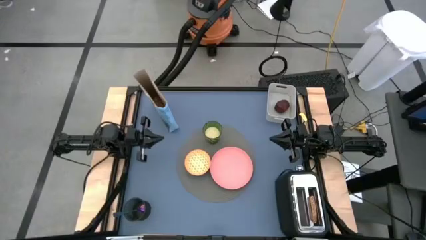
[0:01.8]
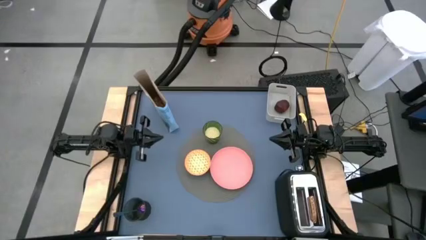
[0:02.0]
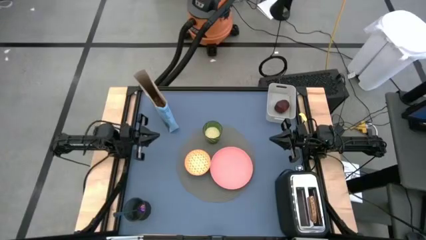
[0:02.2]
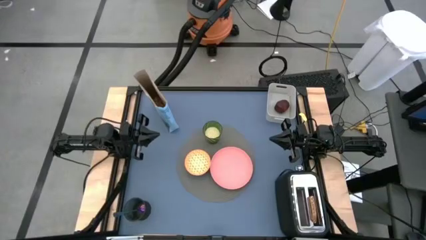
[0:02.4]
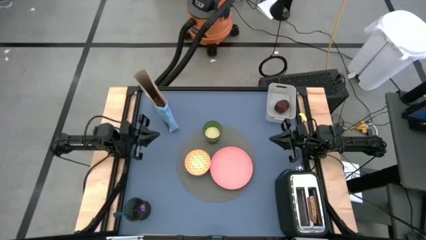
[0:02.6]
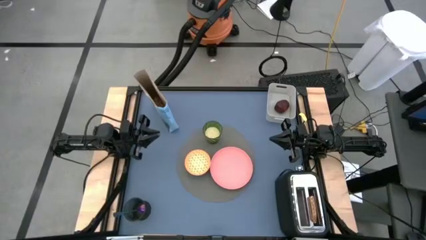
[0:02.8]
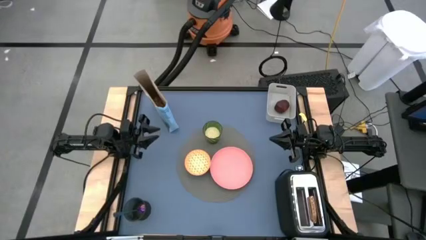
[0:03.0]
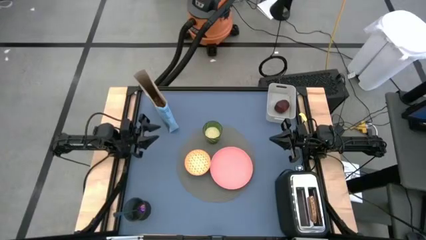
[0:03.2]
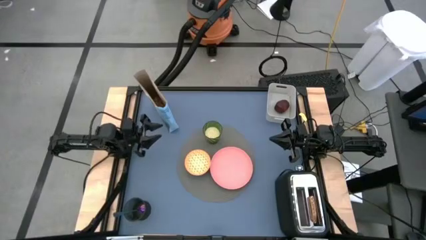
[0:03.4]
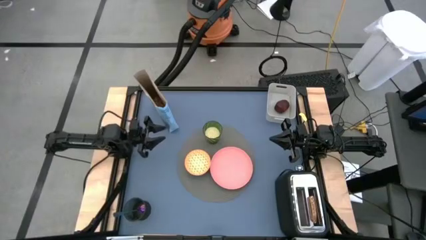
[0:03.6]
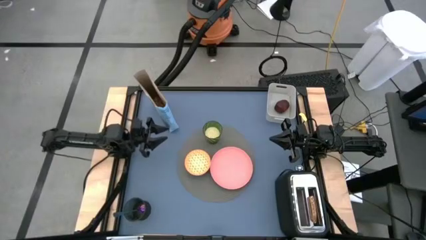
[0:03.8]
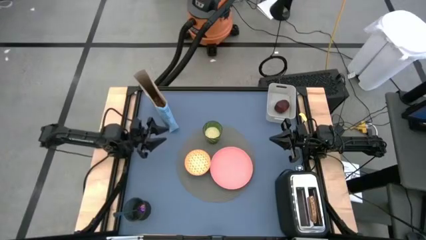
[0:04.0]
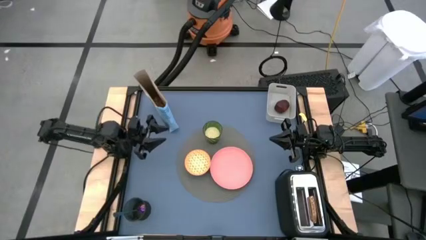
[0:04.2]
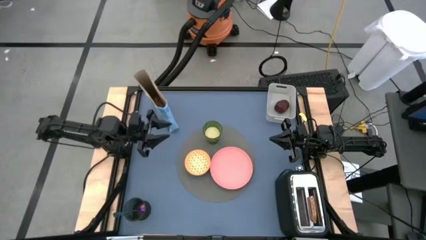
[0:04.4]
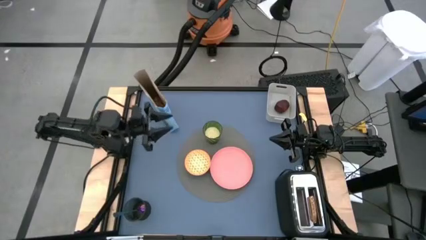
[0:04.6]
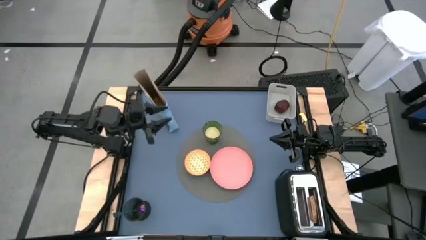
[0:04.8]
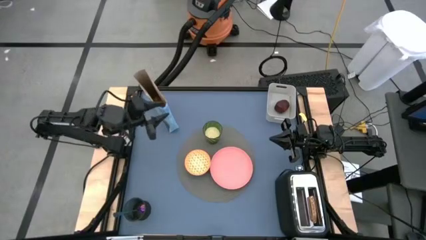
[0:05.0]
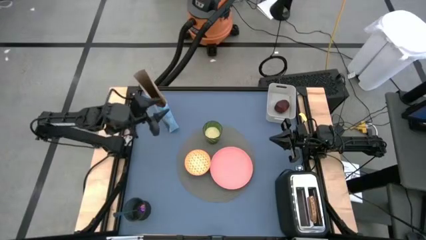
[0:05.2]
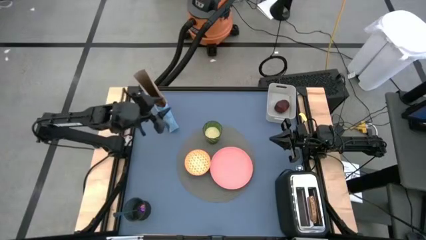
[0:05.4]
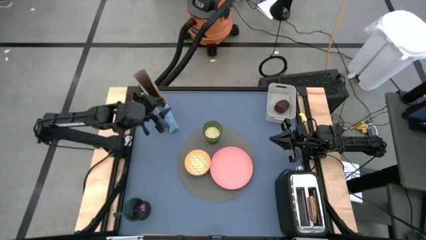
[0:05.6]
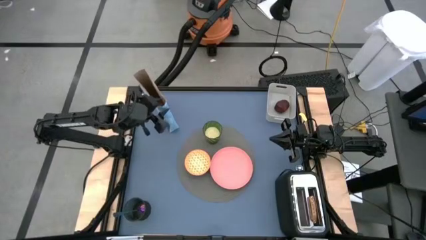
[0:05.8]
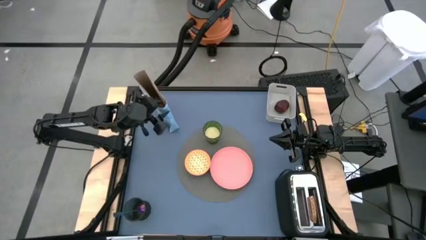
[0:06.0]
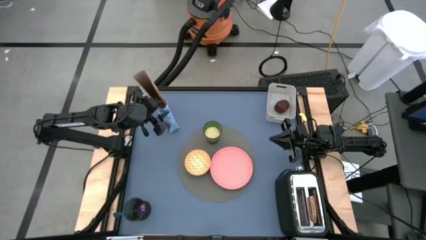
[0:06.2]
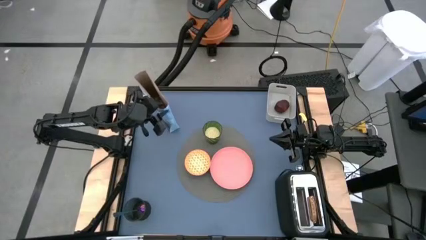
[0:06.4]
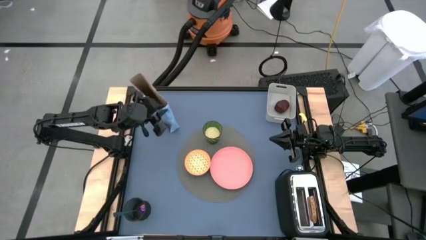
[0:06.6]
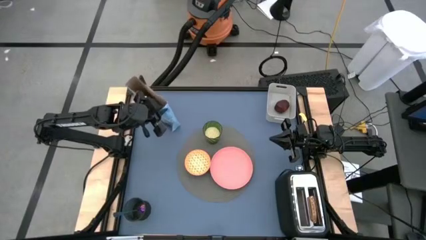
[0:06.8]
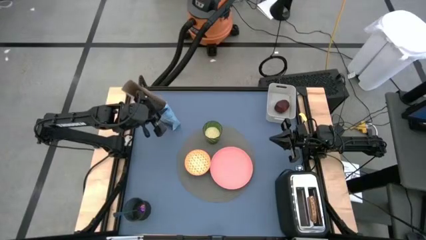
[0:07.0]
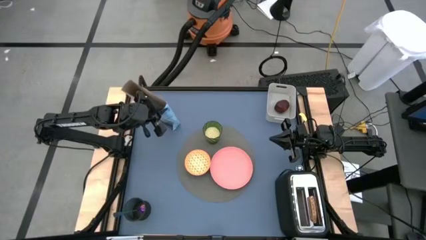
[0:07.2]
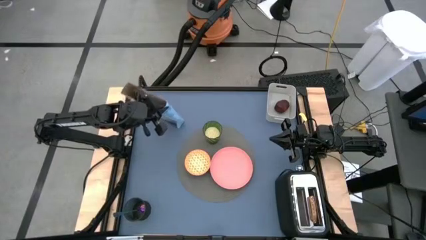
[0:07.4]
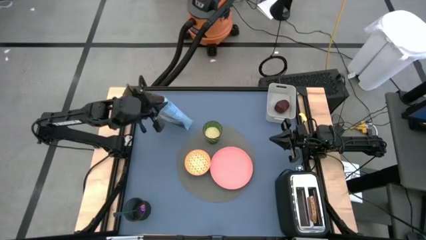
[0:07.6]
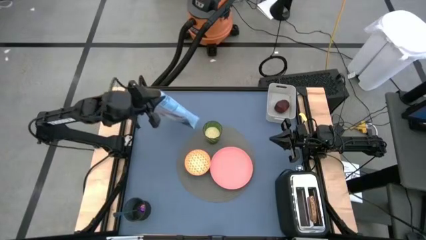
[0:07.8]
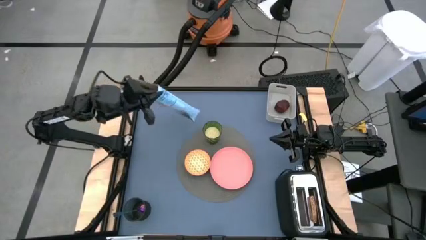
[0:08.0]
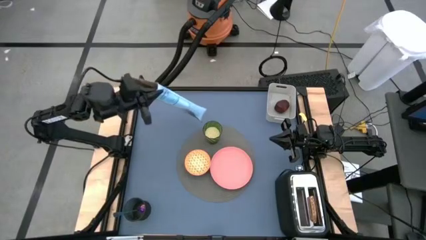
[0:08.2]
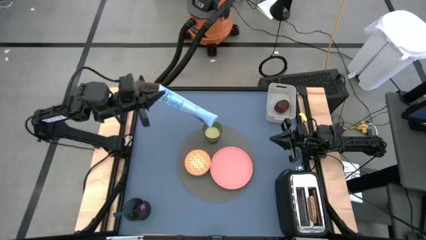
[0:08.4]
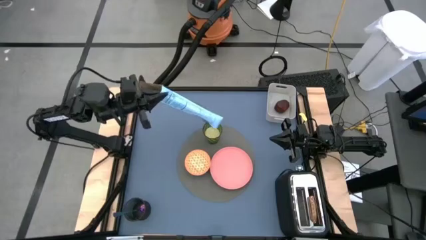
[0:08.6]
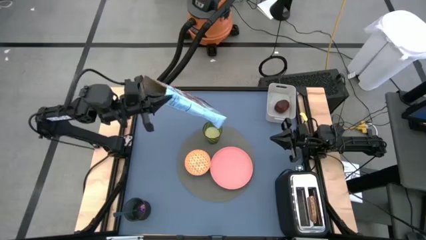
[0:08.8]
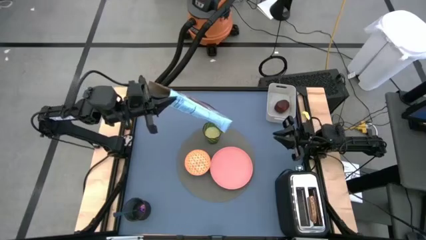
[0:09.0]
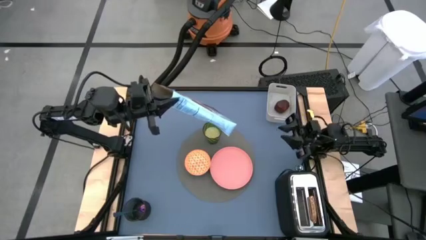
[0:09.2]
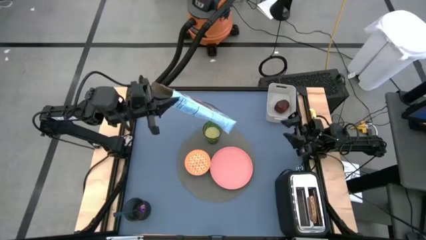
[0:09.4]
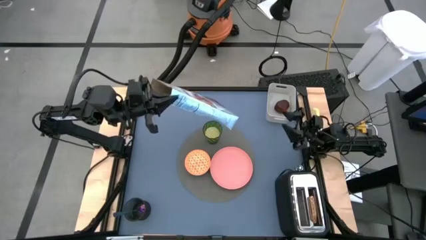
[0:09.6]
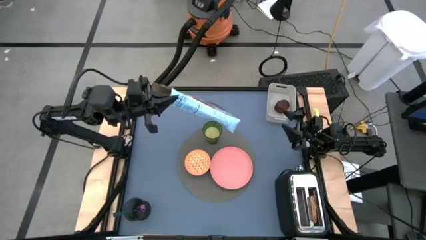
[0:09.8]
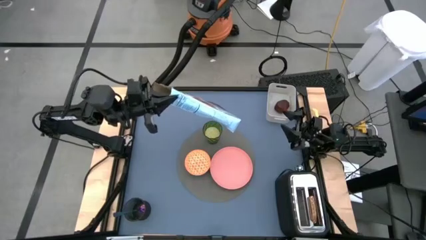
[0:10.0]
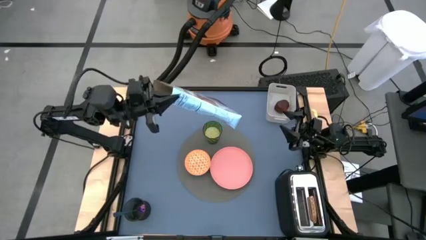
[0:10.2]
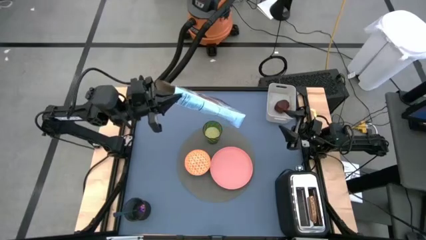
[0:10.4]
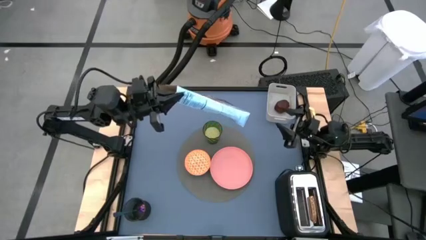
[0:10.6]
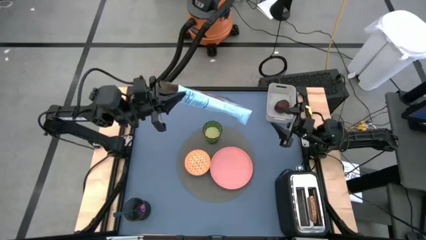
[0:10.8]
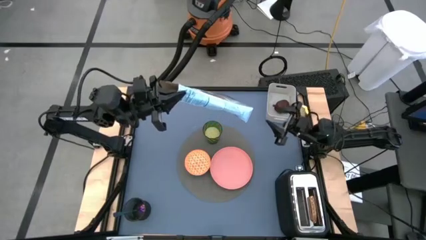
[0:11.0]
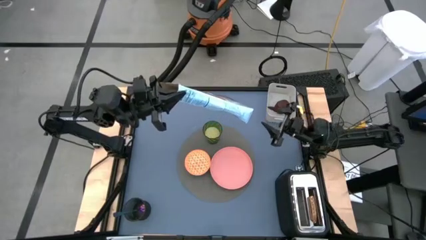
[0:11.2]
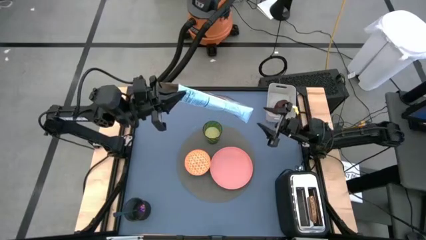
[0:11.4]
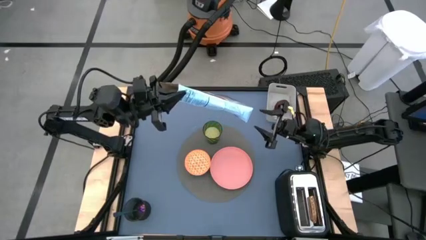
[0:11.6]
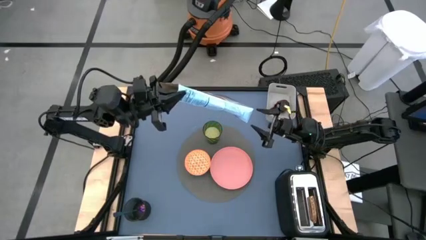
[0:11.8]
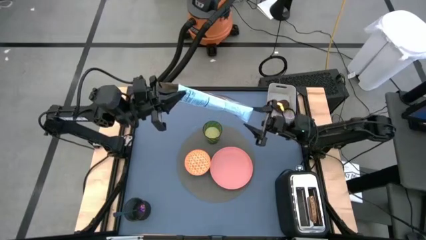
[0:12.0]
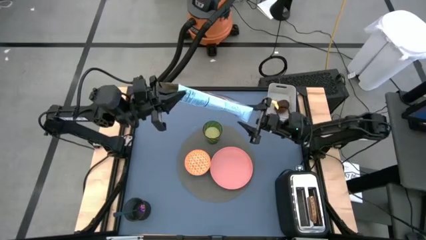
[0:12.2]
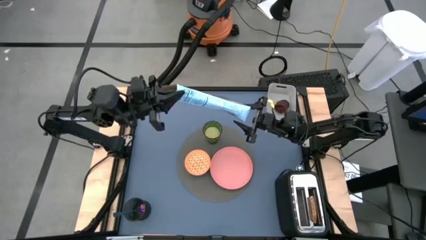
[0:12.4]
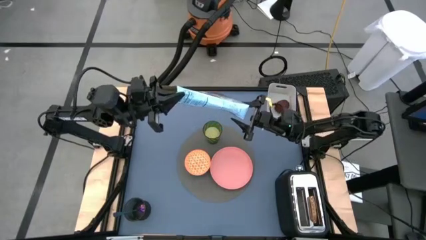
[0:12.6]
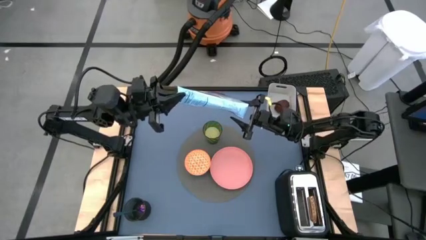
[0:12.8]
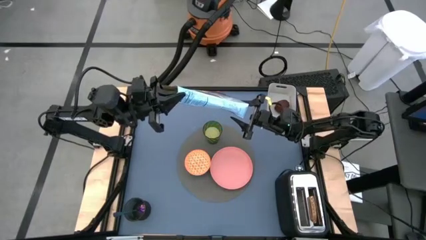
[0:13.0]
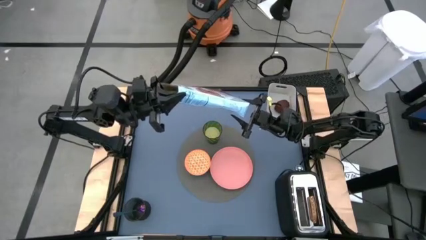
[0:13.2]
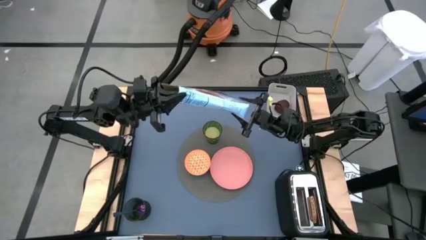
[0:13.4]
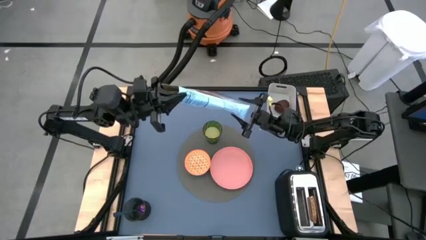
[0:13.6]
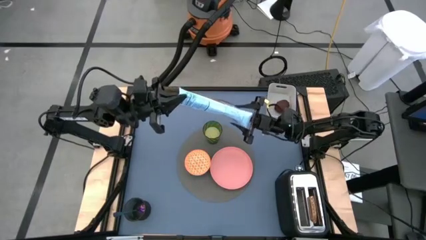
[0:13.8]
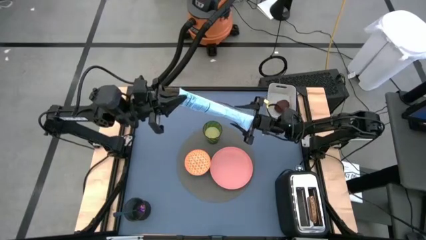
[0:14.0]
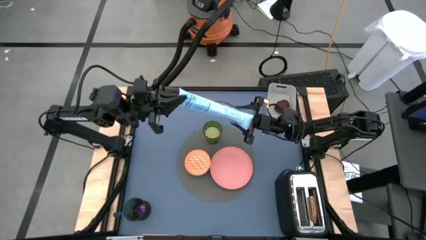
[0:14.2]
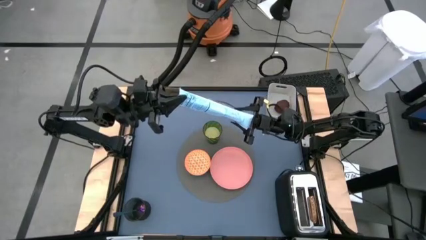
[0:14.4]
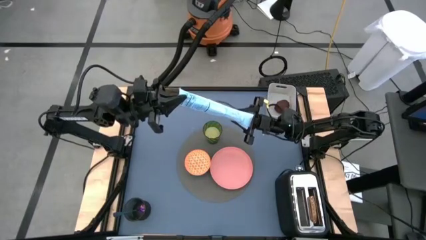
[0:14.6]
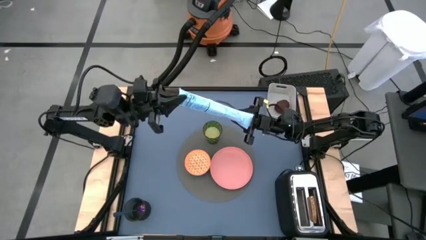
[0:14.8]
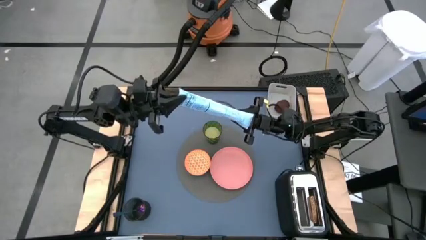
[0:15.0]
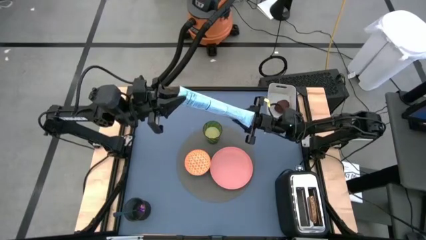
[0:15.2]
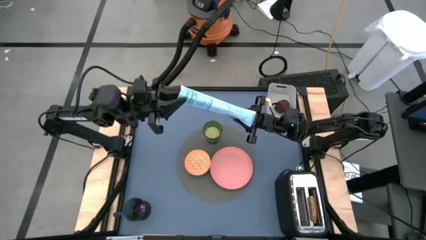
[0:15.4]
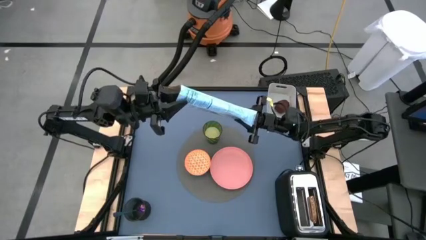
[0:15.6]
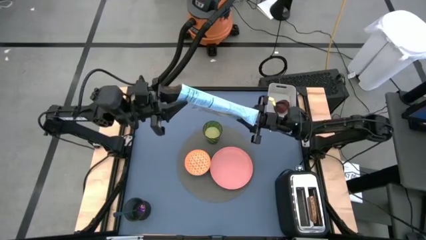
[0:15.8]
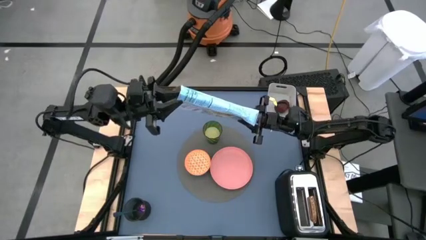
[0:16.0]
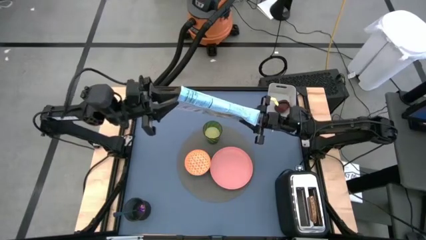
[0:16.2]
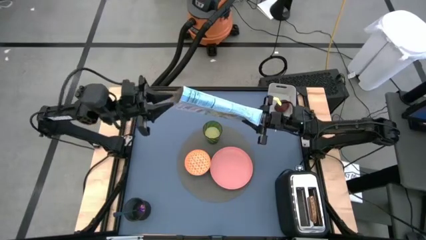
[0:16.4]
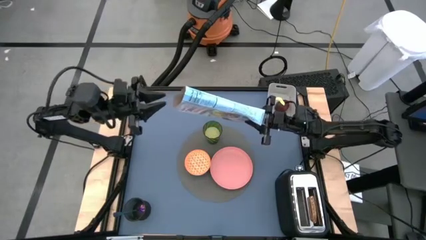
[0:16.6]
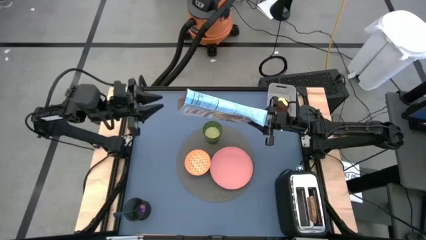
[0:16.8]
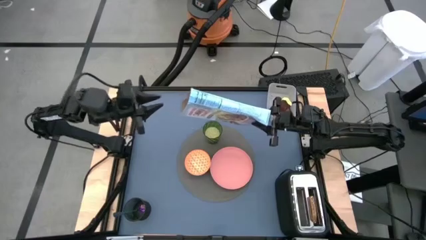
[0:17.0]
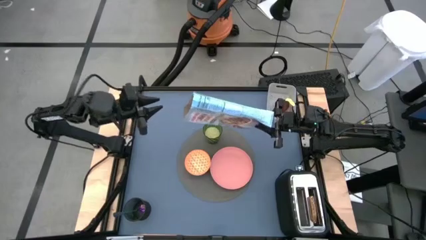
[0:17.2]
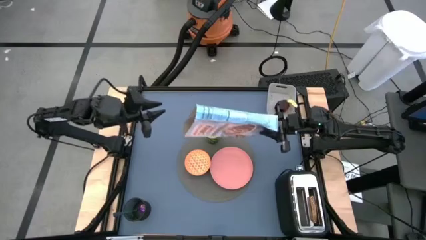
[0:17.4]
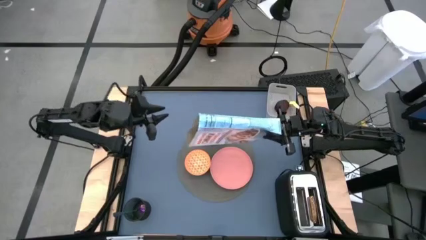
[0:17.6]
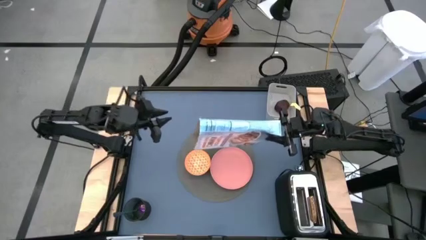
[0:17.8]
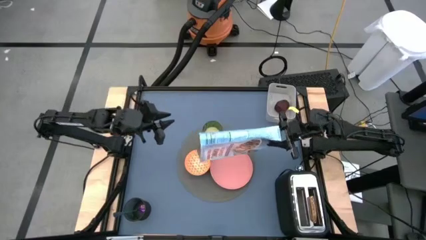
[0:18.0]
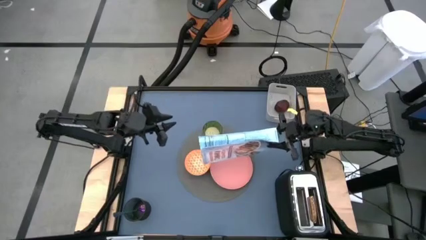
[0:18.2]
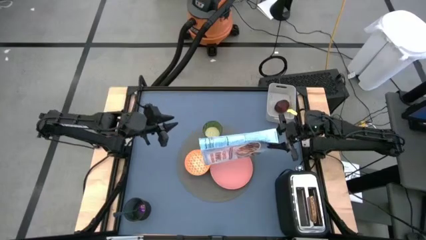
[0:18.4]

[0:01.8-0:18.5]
Task: Arrange a breakfast setting
Pour the cereal from the blue cereal box into the orange bowl
